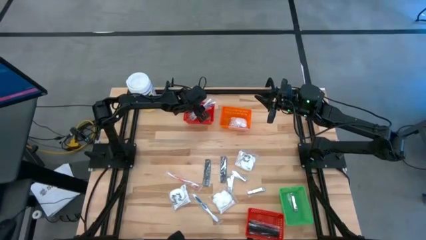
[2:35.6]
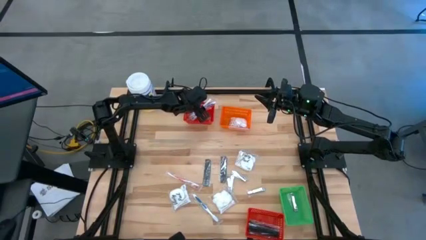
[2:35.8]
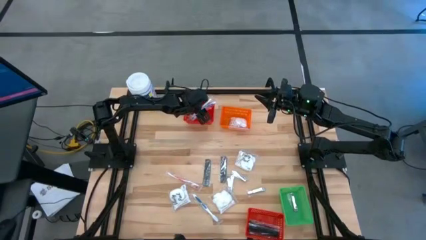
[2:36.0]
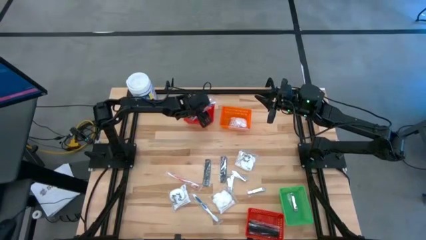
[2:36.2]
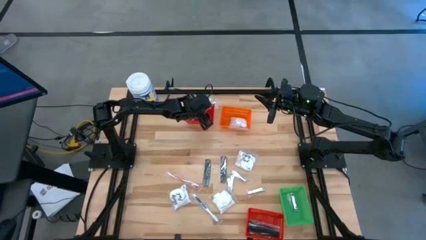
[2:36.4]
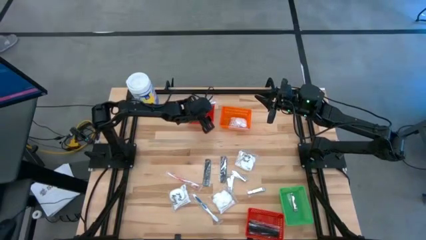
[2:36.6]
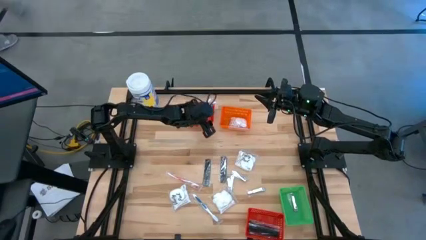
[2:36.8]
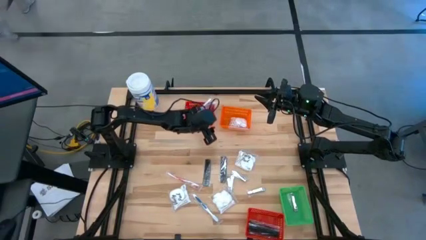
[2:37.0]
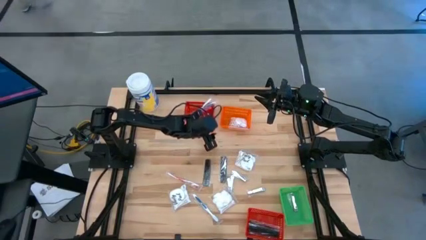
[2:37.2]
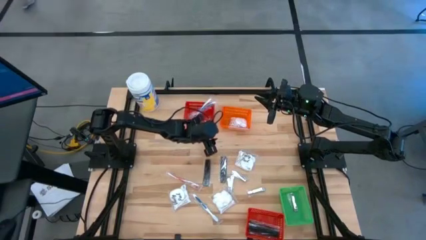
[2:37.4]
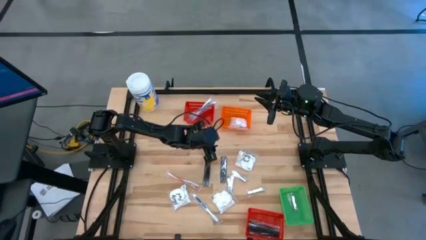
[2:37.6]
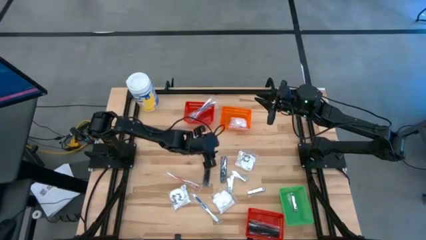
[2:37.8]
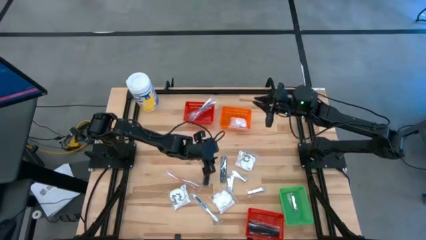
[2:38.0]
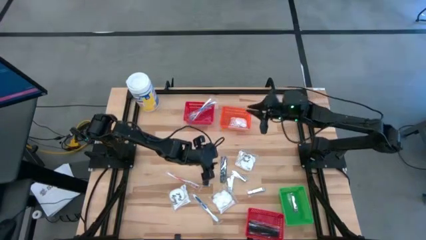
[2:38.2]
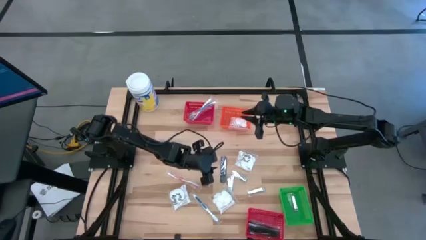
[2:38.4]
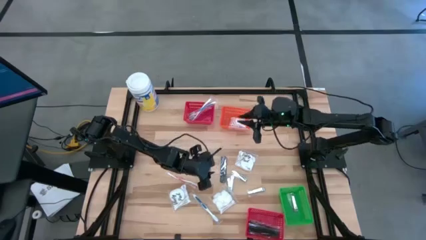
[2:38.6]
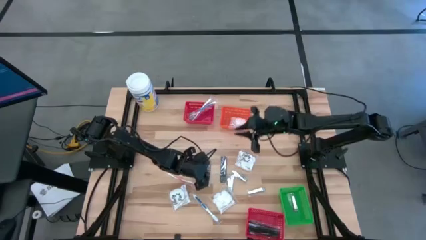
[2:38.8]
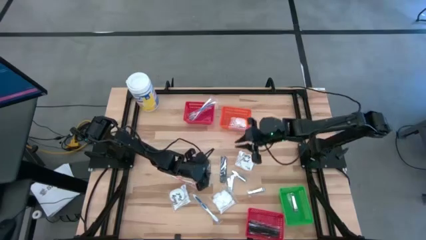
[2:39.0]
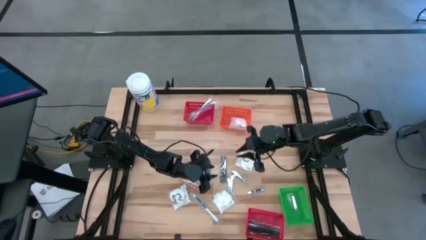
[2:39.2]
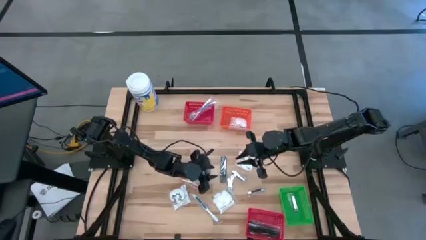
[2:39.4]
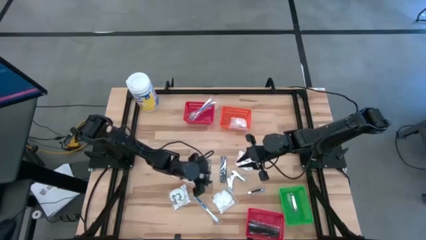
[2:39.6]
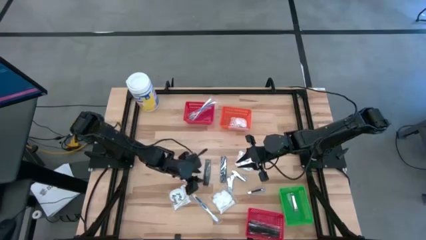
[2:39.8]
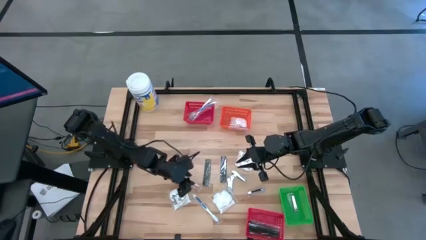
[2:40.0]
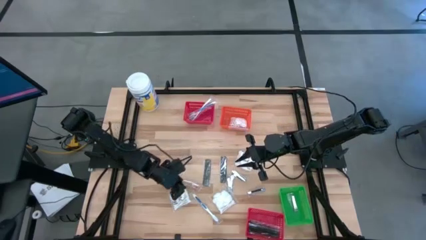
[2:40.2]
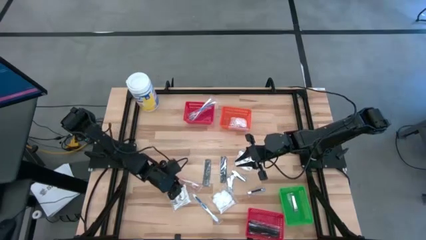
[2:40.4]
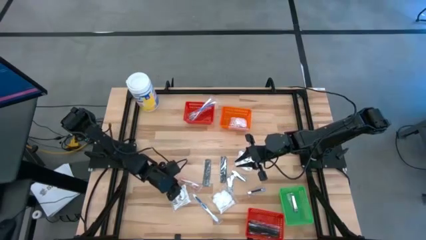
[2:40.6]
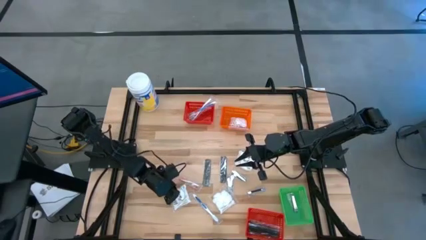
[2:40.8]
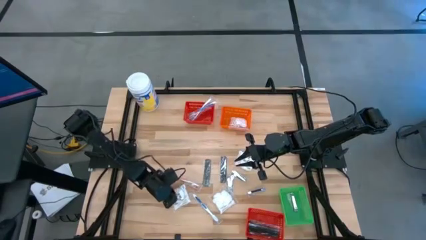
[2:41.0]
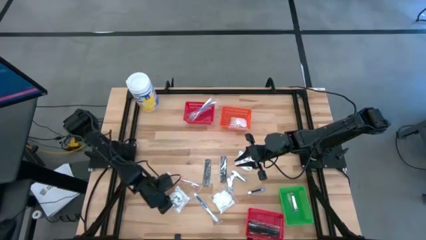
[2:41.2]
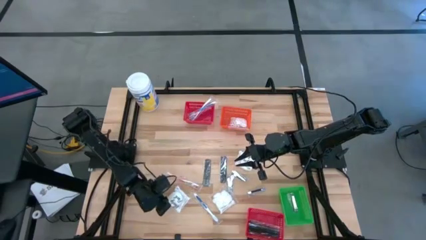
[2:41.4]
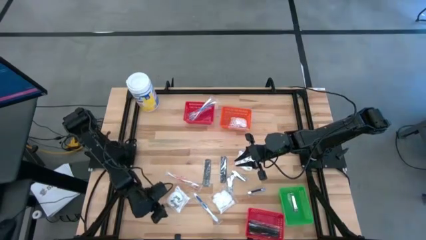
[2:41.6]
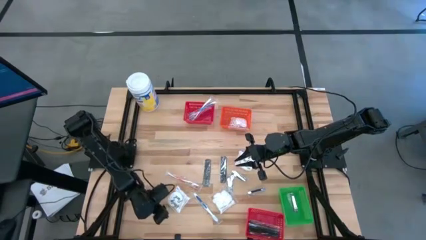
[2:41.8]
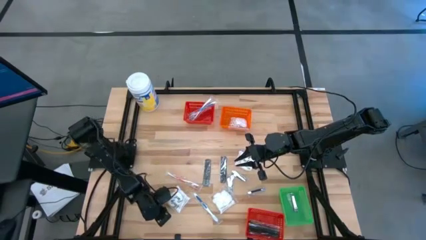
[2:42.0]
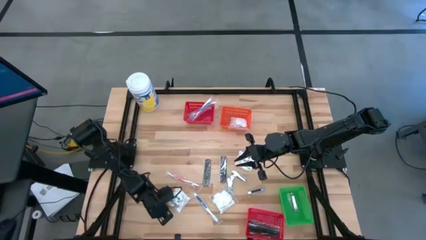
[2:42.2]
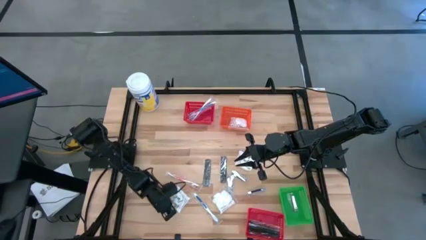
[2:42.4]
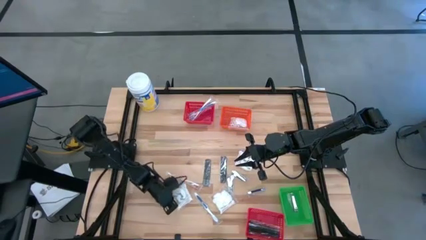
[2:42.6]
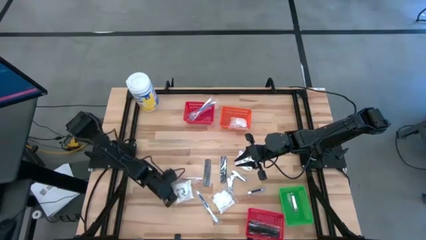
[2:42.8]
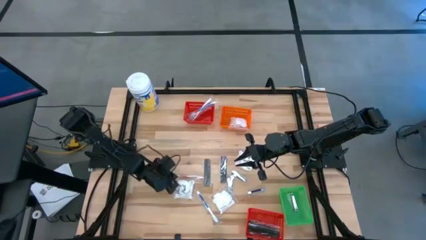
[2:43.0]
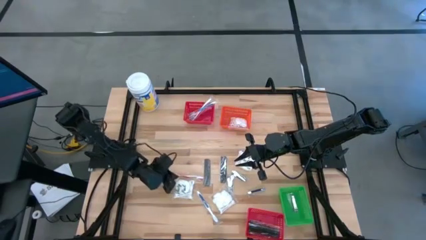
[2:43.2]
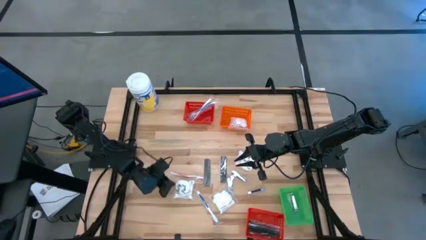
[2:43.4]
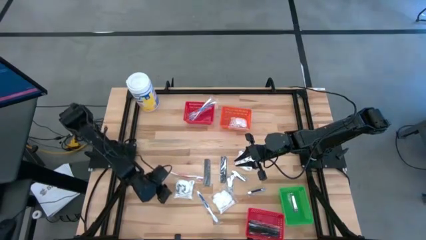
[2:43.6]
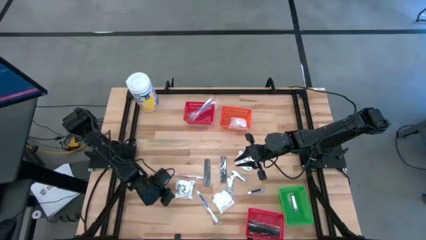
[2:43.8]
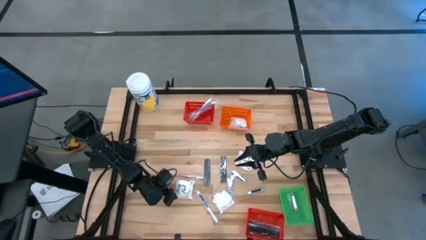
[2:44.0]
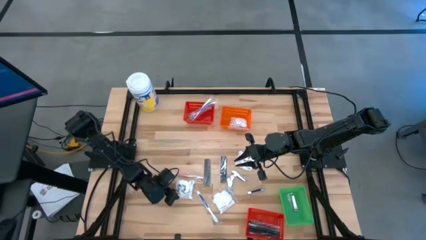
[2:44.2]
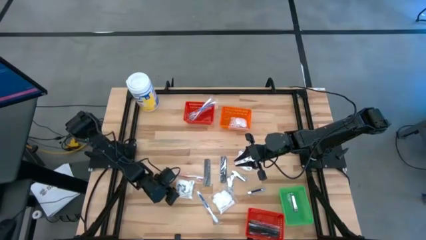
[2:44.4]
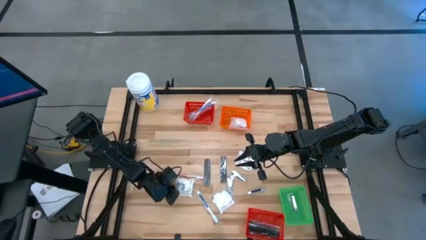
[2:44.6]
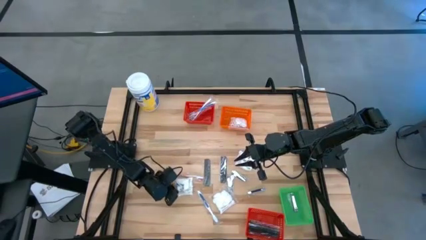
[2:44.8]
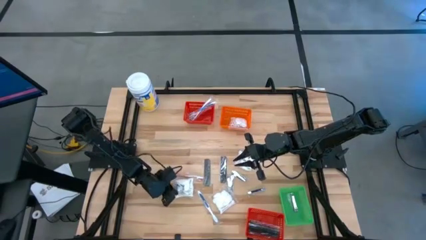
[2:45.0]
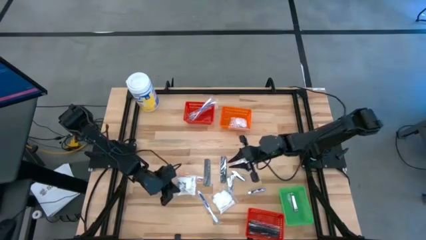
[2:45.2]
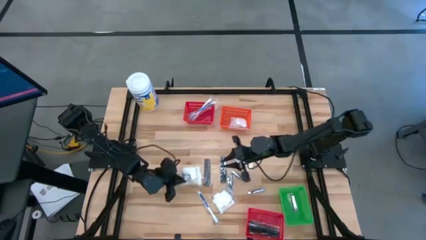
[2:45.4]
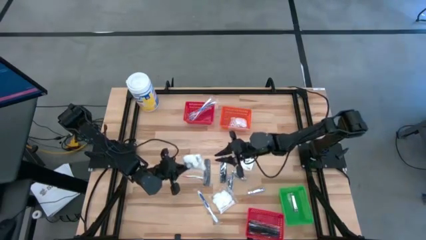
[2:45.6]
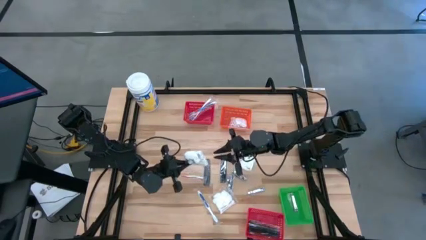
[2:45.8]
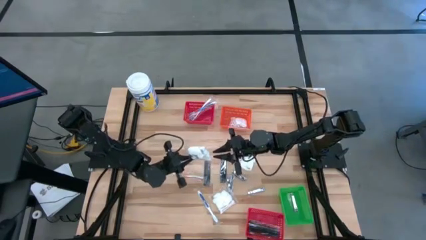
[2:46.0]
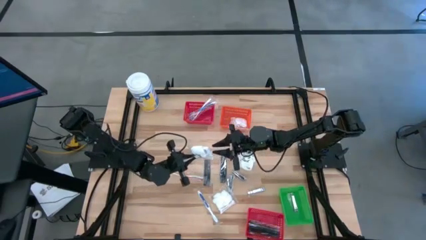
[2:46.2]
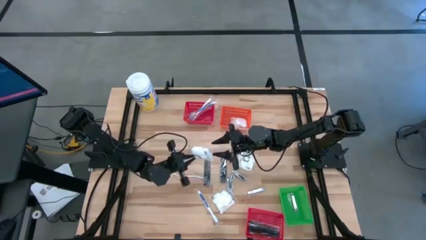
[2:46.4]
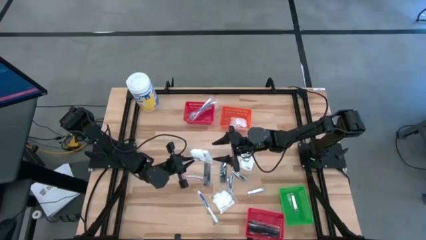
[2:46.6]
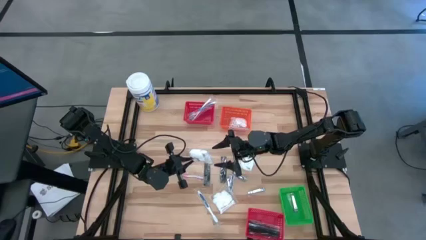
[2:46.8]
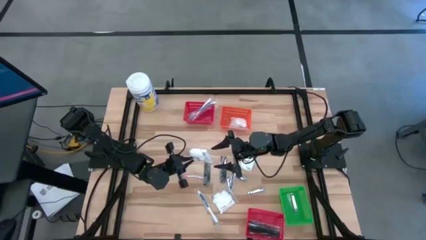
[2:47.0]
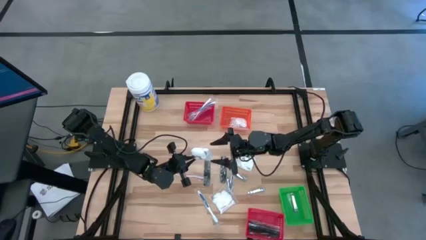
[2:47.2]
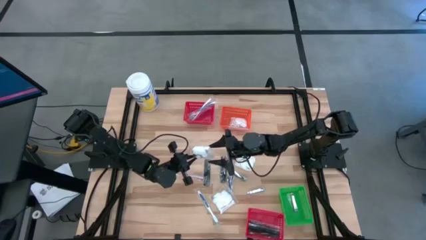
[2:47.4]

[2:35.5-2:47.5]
Task: Pick & Place Travel size toiletries
Put the white cotton pack into the orange bin

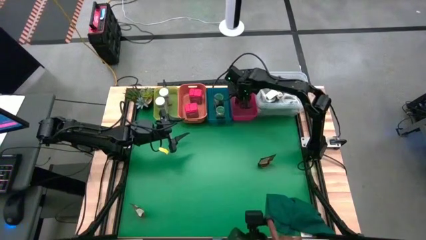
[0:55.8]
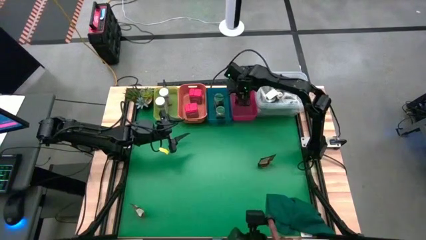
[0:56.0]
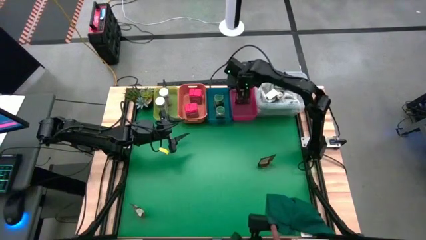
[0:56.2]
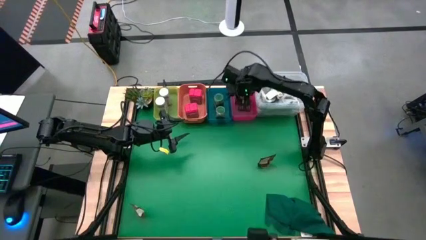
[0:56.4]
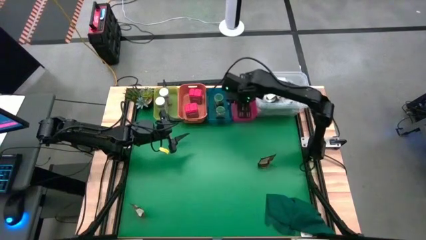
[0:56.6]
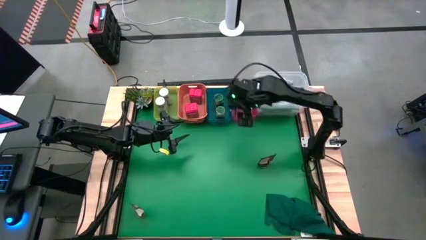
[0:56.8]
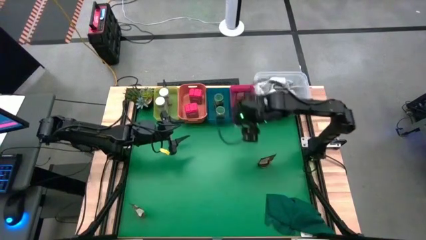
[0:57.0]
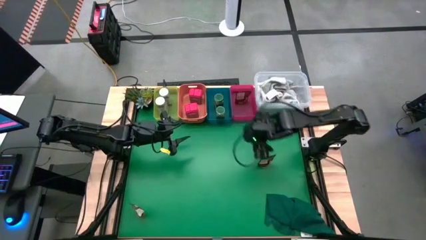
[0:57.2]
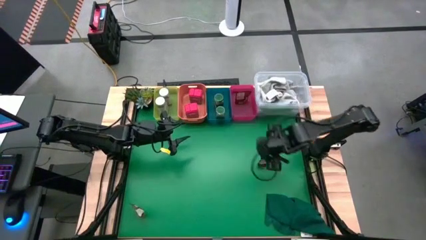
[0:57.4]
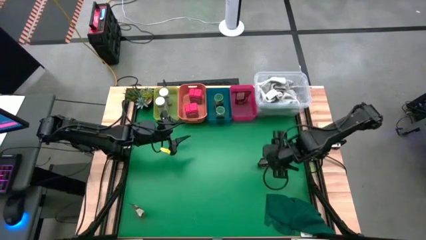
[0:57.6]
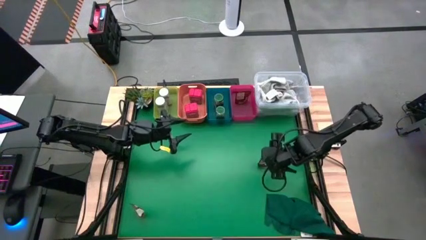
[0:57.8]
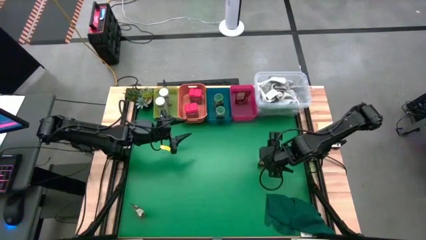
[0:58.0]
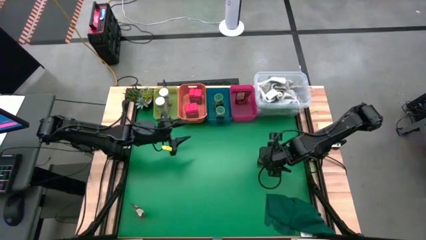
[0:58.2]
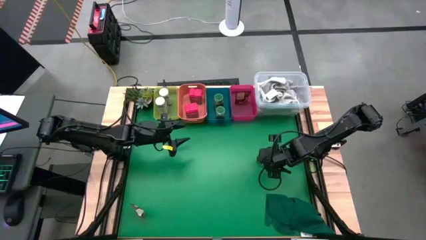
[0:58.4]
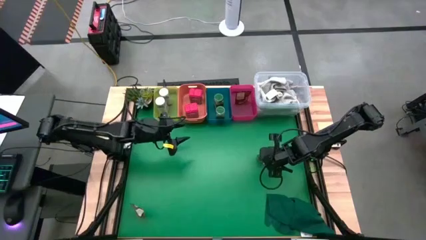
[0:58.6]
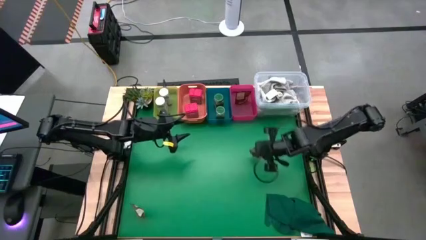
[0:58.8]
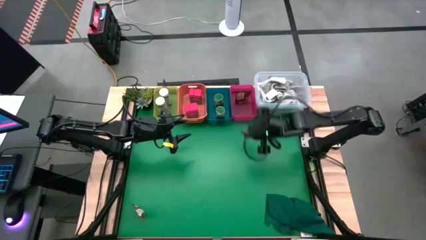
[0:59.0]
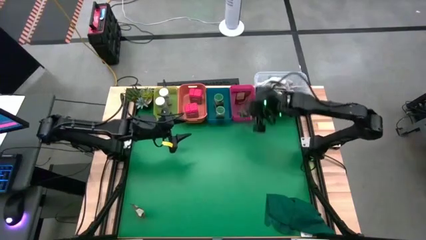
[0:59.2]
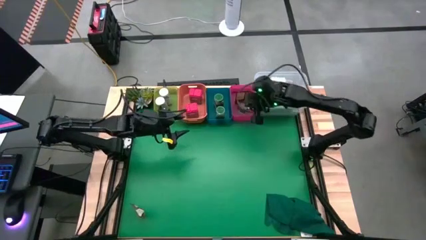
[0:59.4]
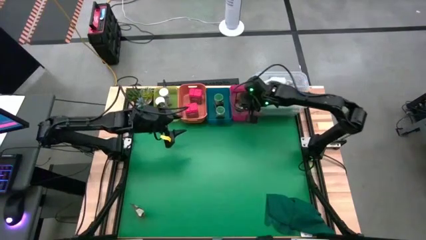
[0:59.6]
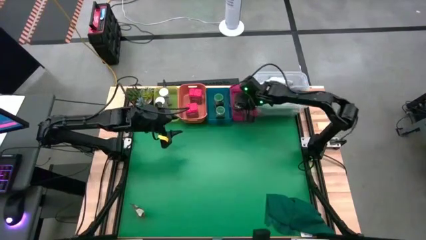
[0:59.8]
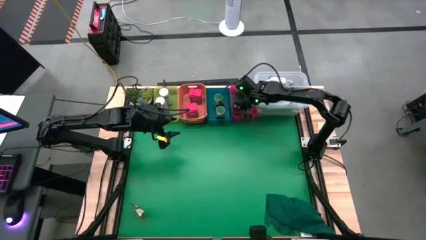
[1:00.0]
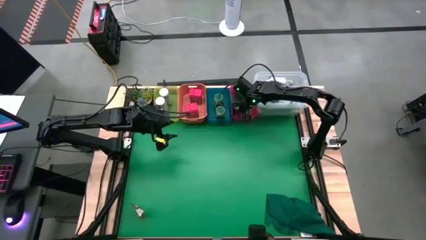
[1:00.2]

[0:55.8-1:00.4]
Task: Sort spices by type
Put the right brown seasoning into the red bin
